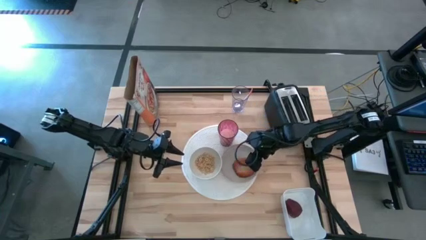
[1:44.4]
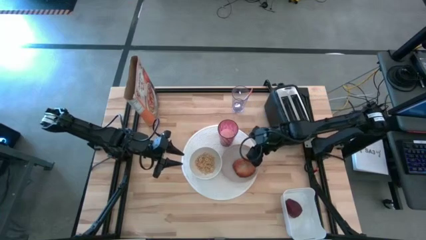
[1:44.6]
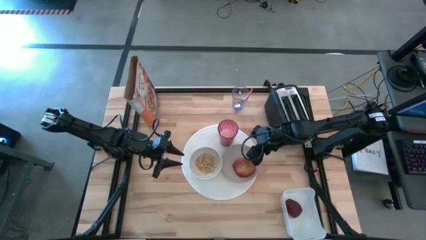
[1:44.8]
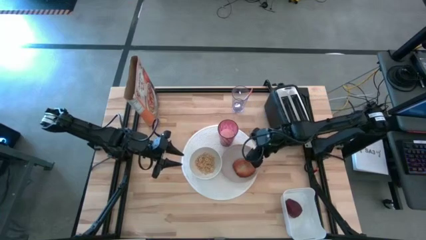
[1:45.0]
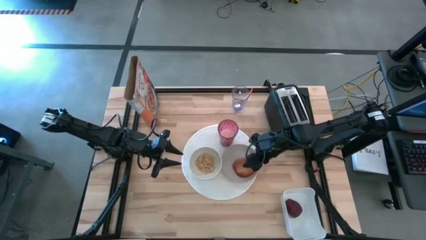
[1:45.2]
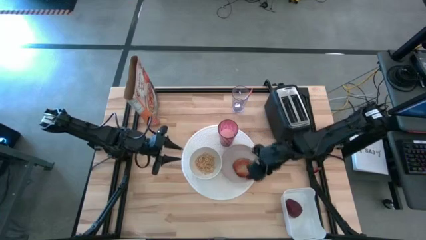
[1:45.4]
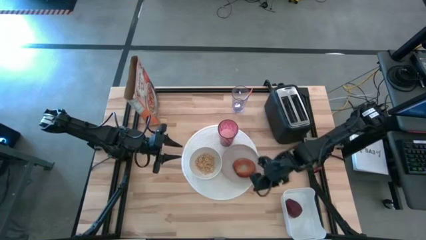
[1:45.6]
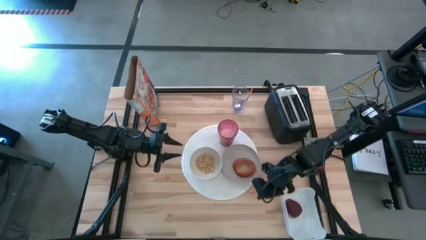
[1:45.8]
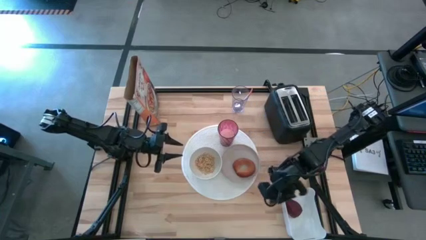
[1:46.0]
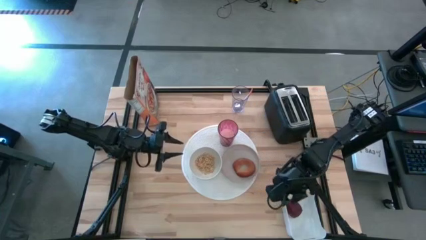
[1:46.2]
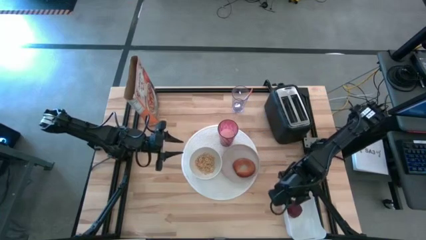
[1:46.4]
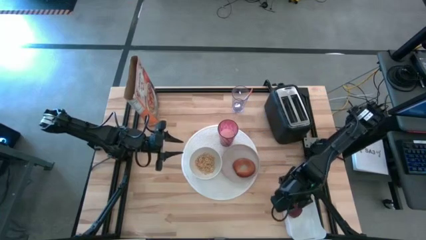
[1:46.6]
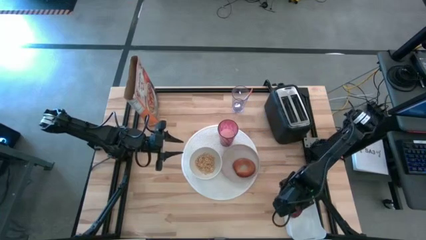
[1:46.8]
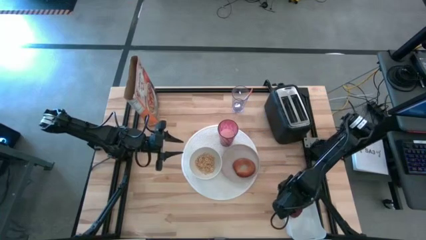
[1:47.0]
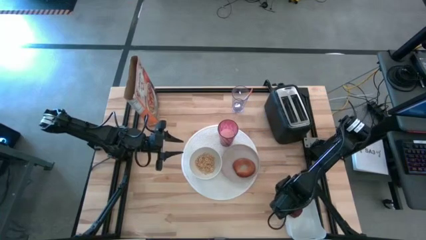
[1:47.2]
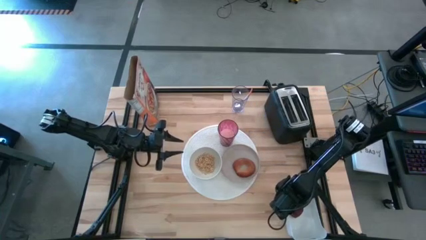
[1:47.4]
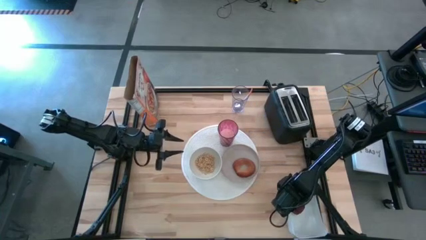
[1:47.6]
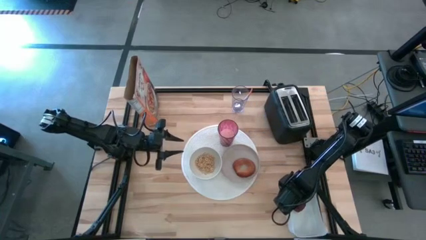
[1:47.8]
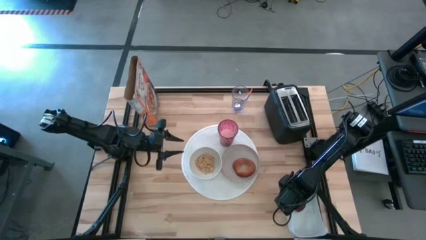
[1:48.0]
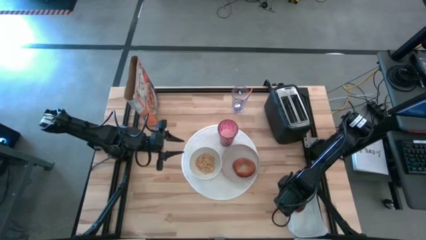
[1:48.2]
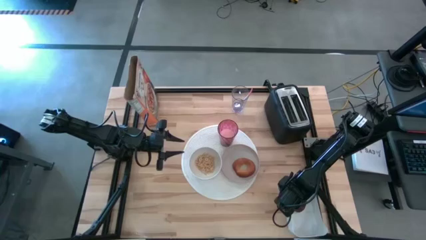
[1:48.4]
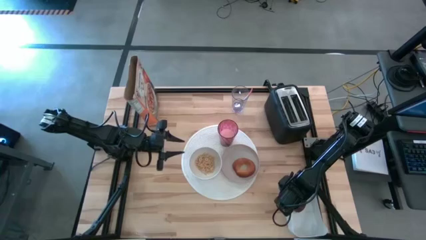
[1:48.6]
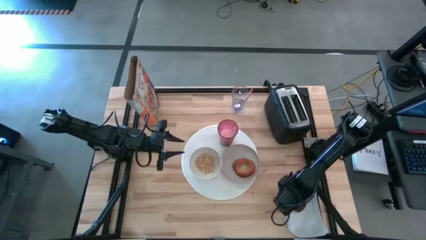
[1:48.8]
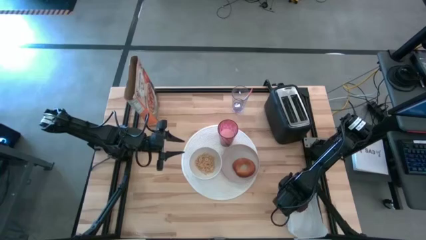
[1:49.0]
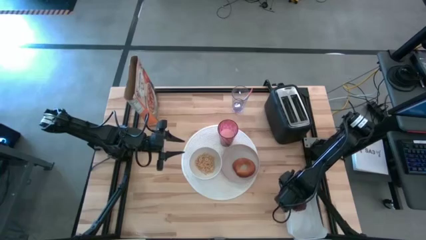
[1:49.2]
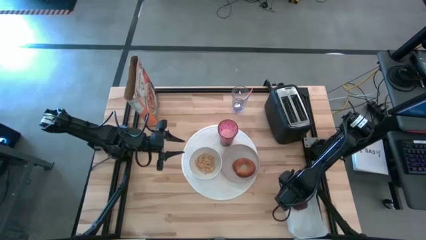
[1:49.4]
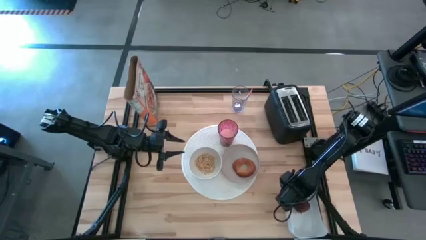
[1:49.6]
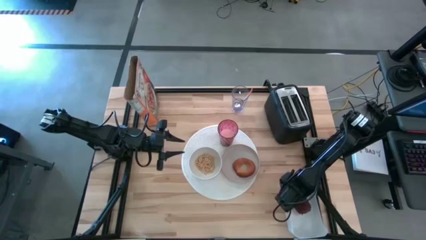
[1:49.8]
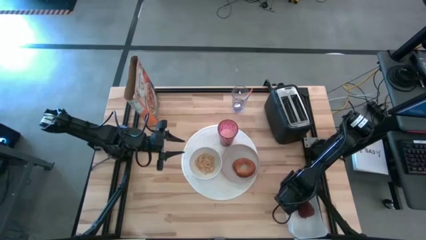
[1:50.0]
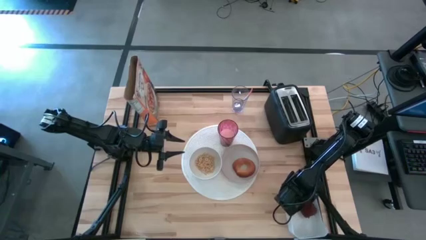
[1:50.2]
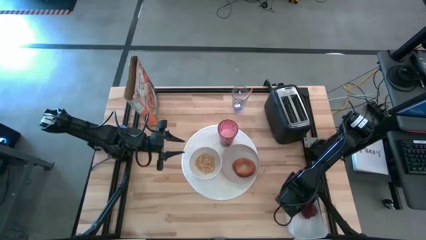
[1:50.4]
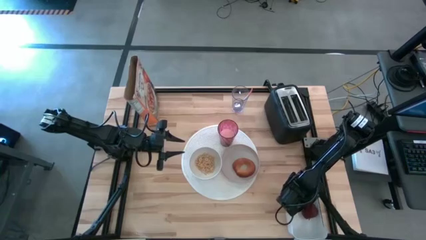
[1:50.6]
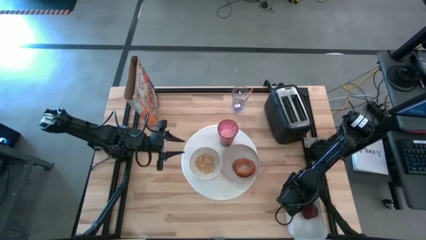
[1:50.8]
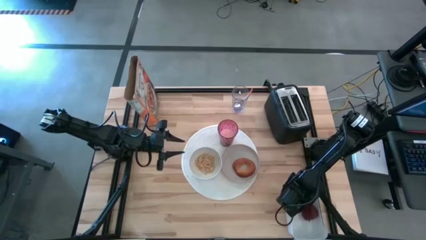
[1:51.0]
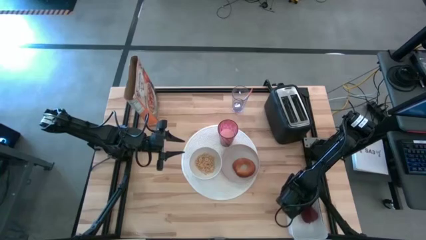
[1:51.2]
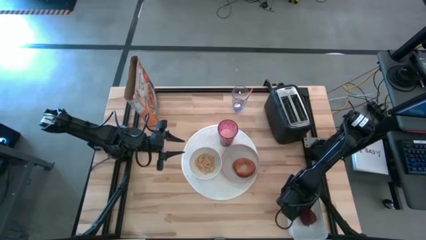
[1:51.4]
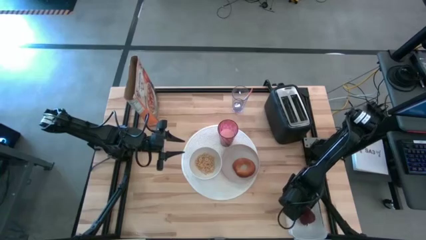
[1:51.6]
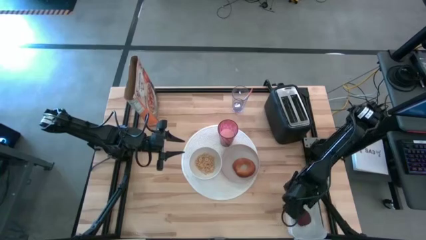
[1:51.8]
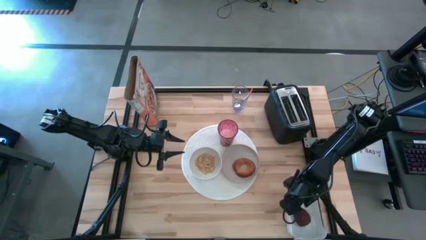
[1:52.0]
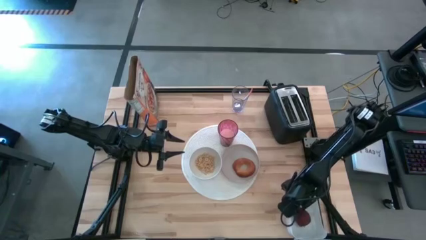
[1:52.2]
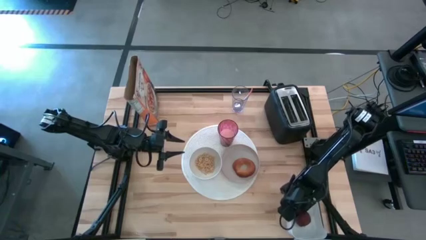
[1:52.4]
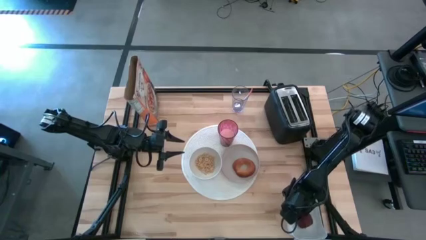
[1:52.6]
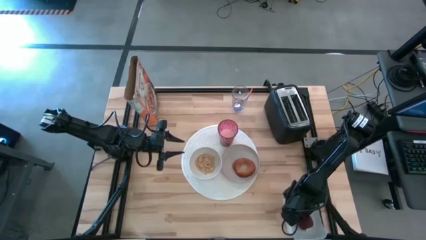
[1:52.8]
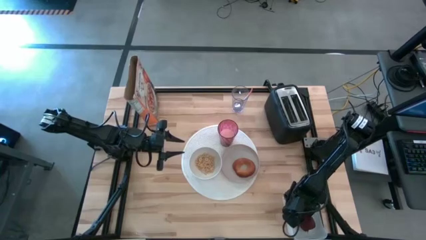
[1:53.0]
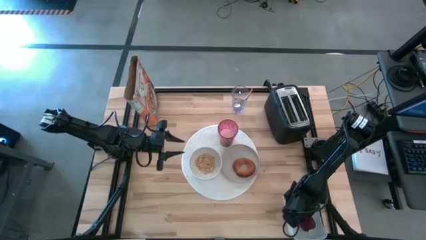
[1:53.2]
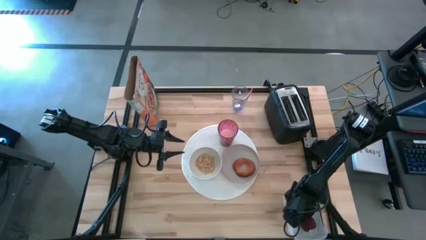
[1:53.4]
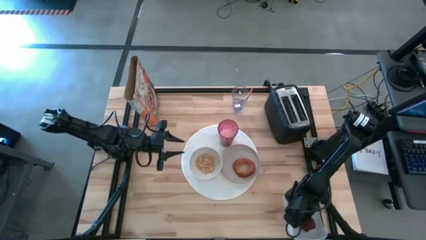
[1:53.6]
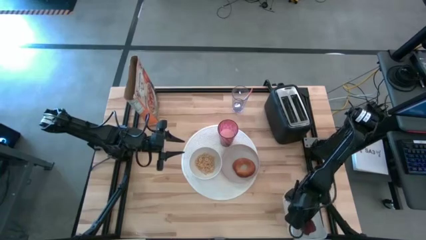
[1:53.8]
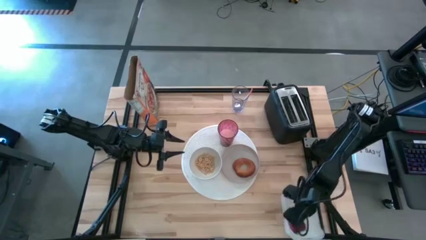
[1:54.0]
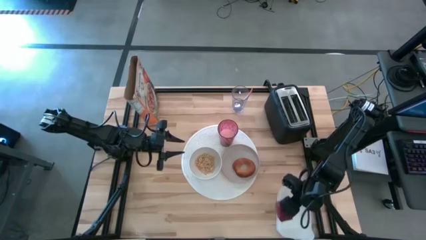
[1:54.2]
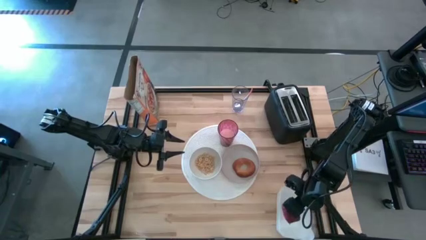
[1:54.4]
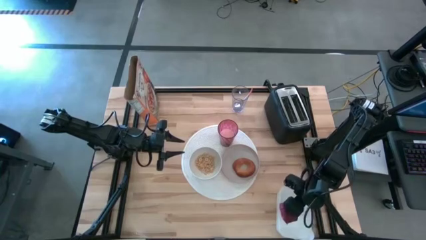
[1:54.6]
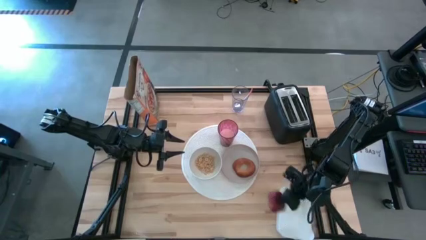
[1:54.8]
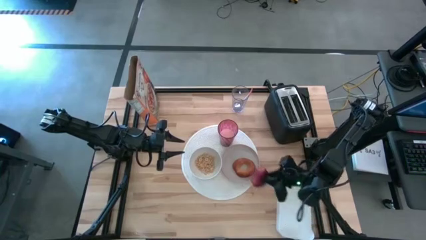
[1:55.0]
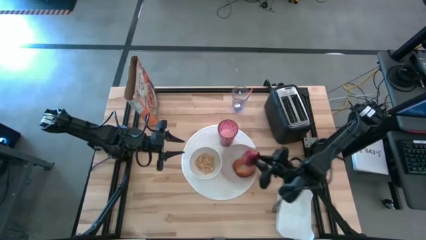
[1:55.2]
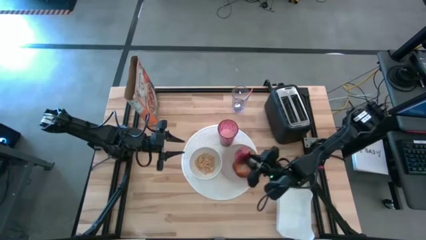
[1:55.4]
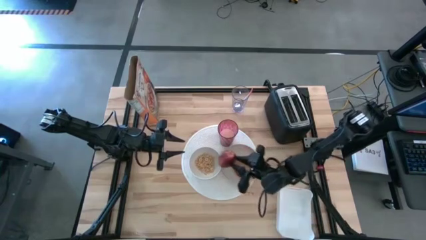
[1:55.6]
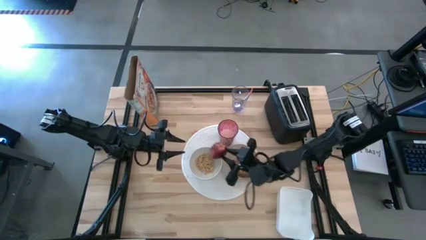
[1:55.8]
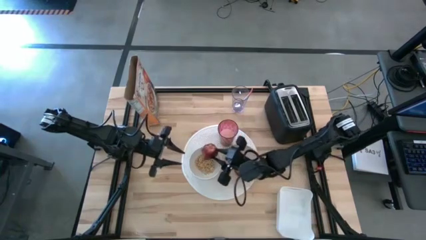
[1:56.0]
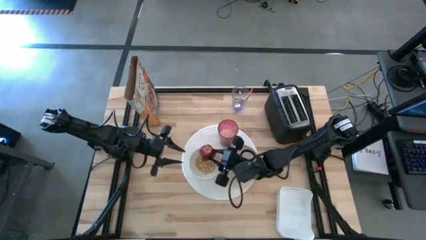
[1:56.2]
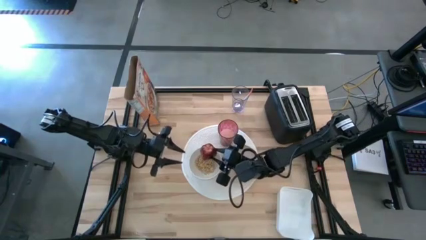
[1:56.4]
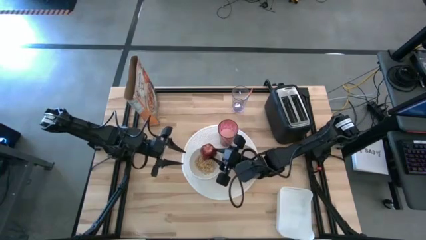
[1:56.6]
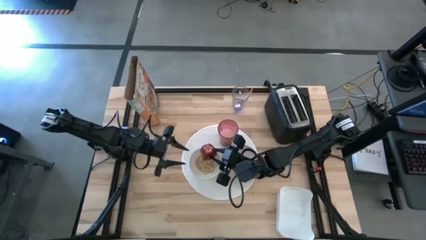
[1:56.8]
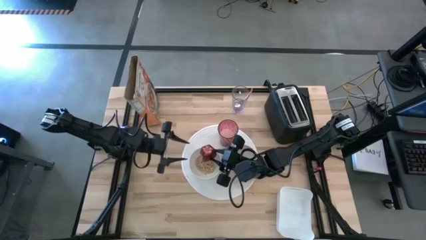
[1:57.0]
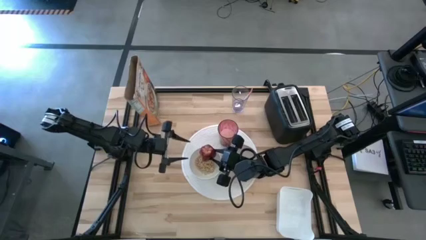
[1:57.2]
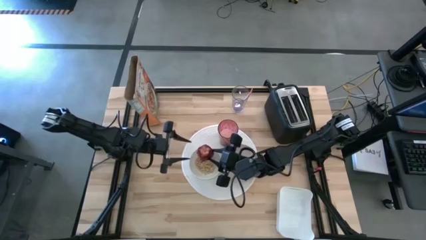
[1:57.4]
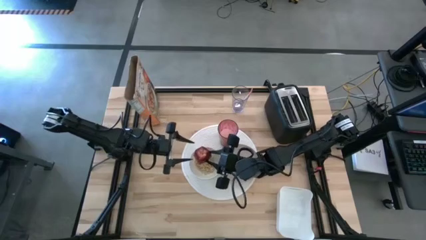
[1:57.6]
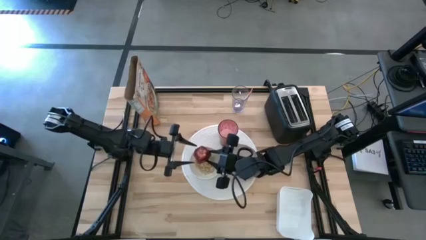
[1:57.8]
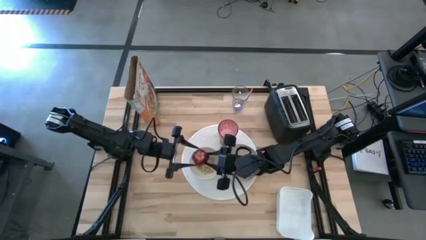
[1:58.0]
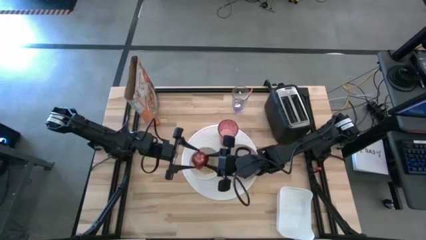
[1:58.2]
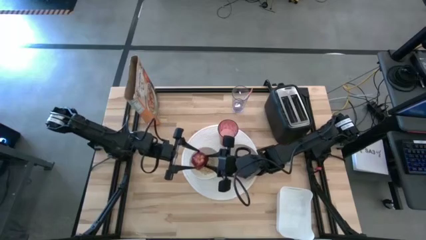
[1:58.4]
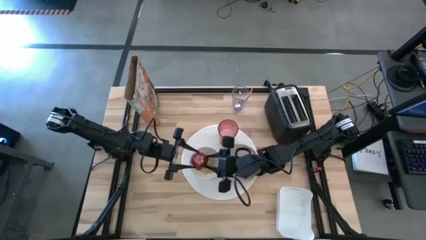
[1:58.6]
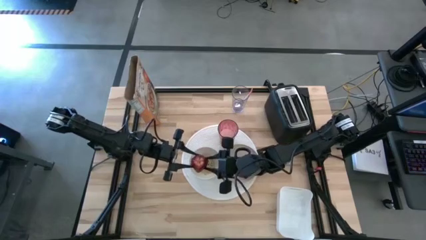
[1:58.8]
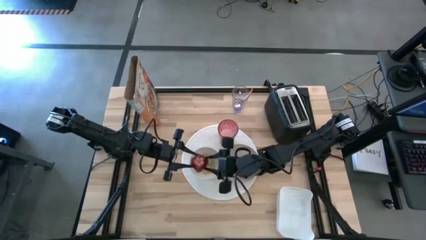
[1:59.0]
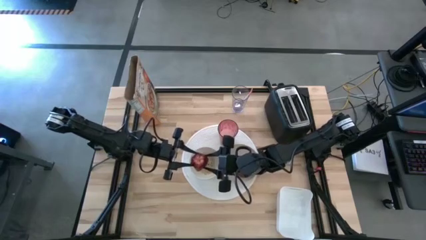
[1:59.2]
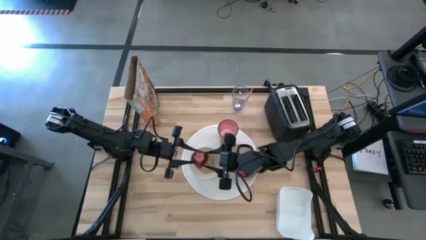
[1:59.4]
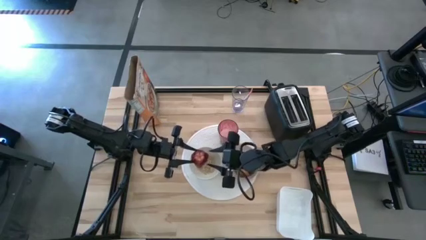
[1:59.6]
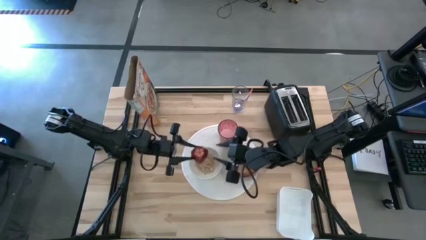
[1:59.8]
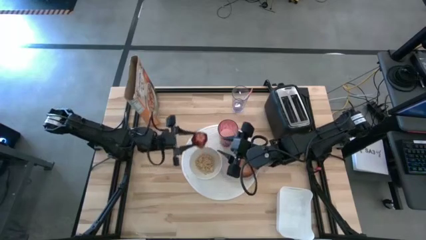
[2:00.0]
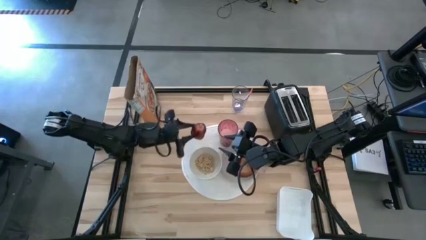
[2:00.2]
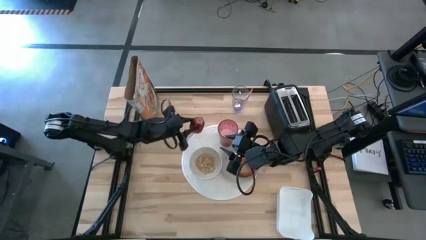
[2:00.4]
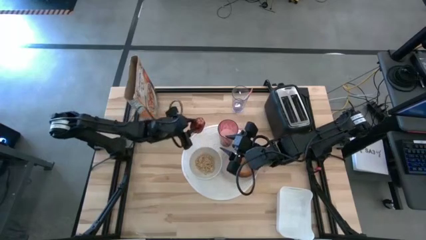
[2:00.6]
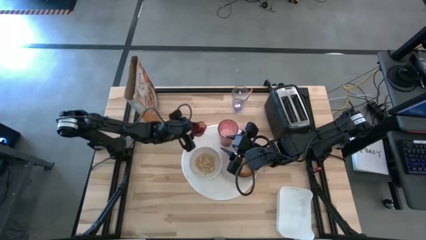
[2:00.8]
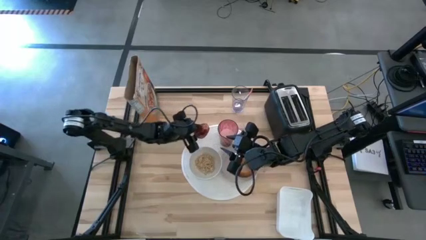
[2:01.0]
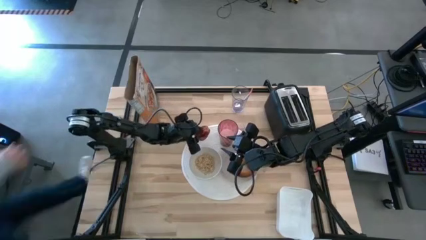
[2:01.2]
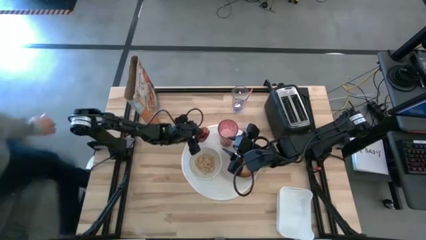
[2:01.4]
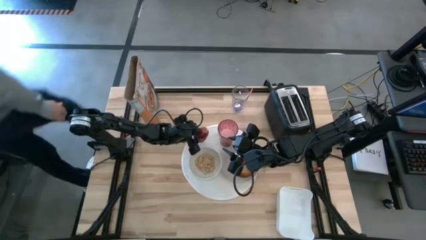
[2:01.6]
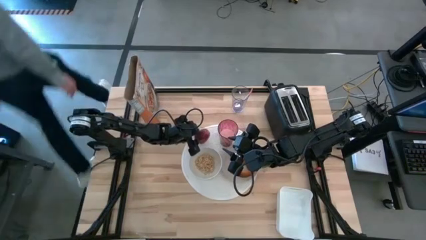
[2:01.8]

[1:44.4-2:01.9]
Task: Arrange a breakfast setting
Put the apple on the white placemat to the top left of the red cup
